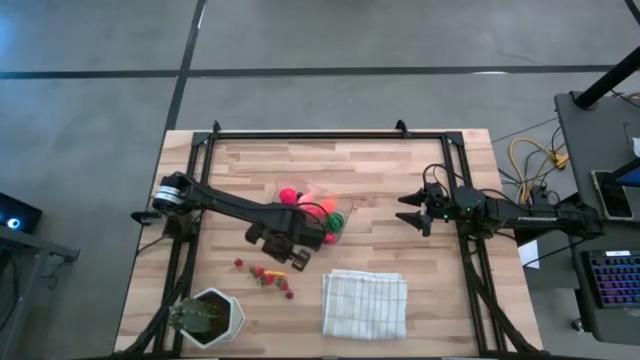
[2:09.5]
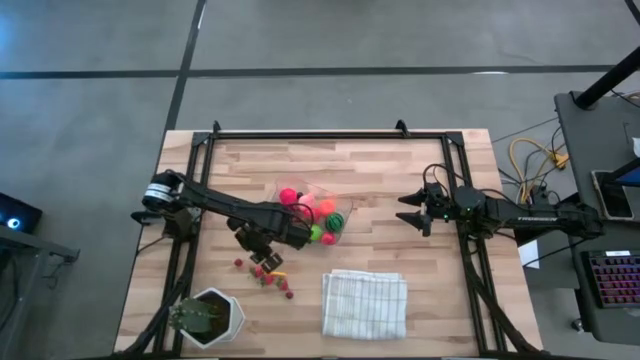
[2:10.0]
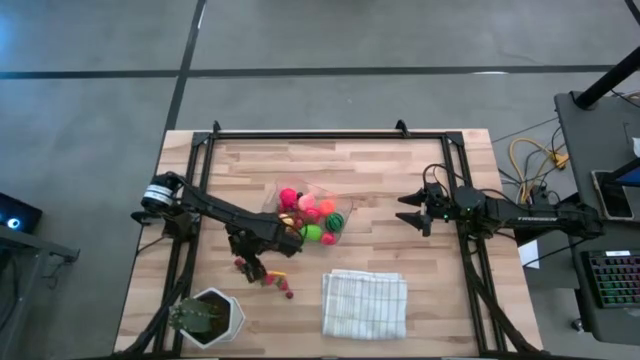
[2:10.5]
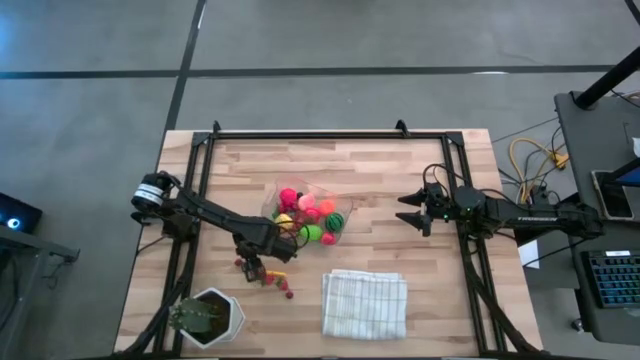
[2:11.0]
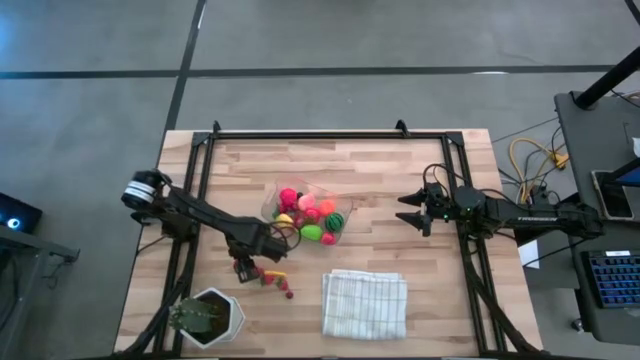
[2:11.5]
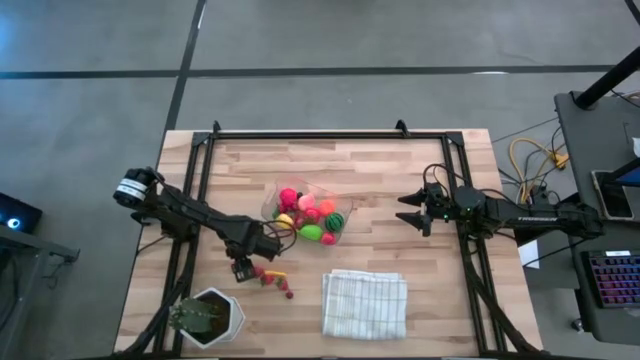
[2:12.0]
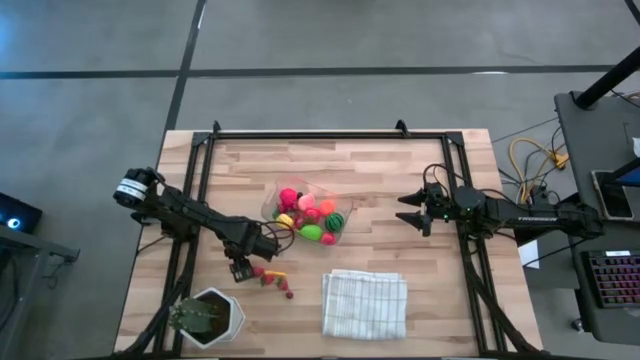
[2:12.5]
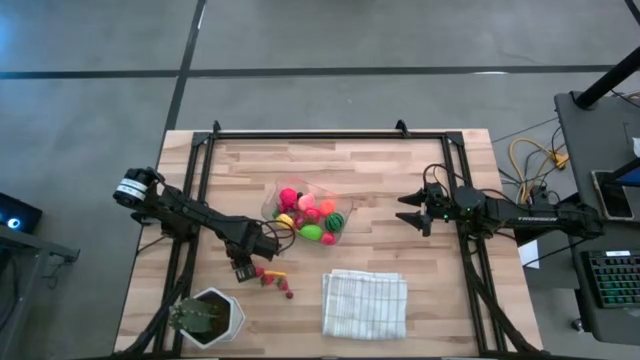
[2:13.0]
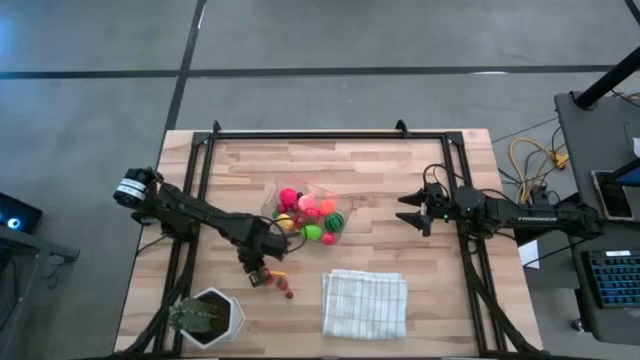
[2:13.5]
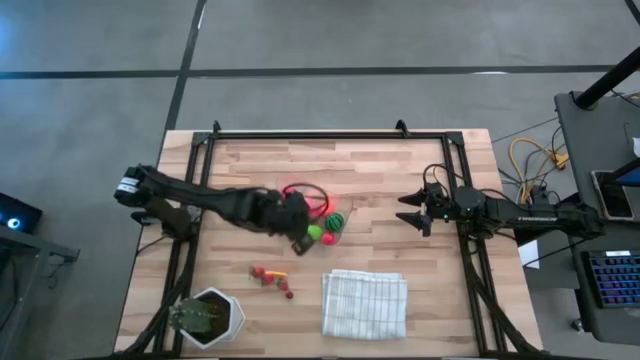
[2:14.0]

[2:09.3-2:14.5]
Task: Pick and placing Produce into tupperware
Put the red cherry into the transparent bin

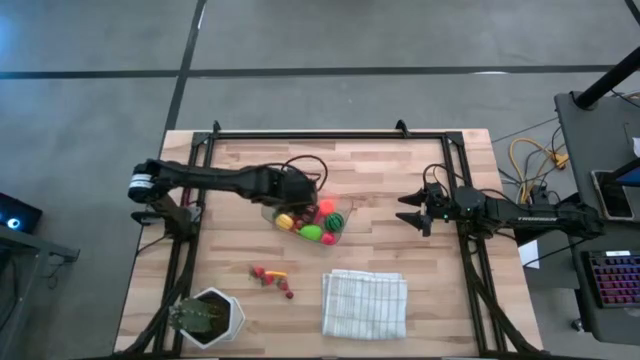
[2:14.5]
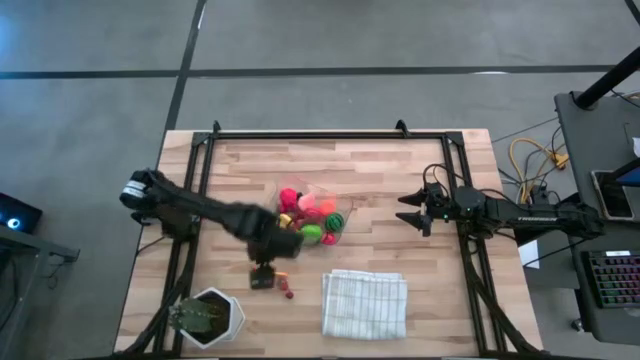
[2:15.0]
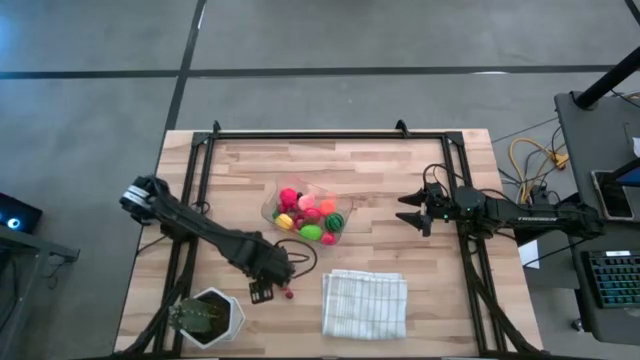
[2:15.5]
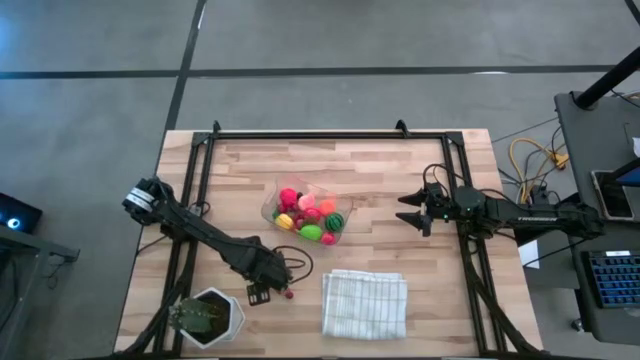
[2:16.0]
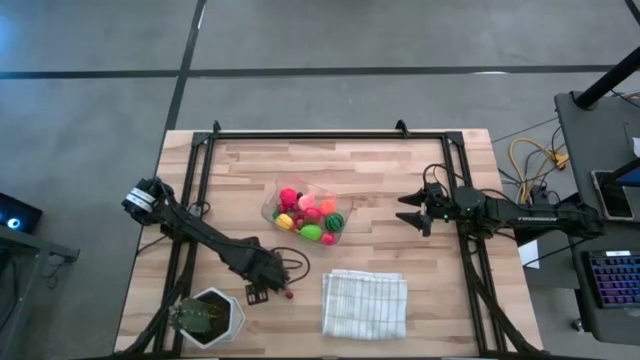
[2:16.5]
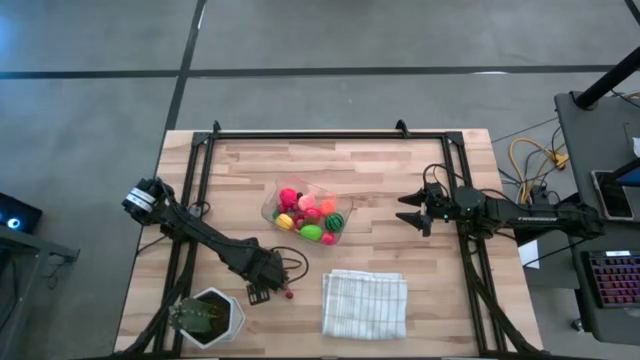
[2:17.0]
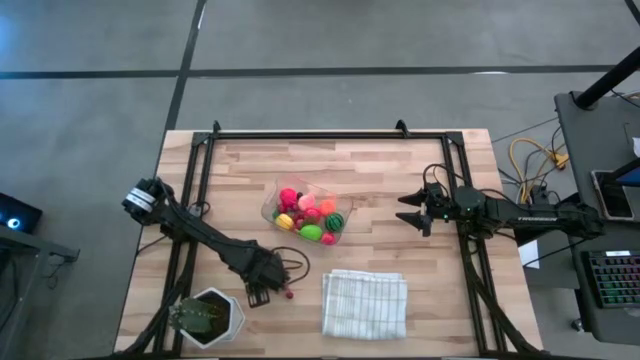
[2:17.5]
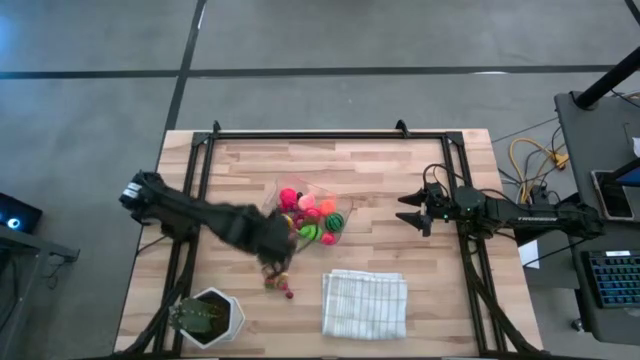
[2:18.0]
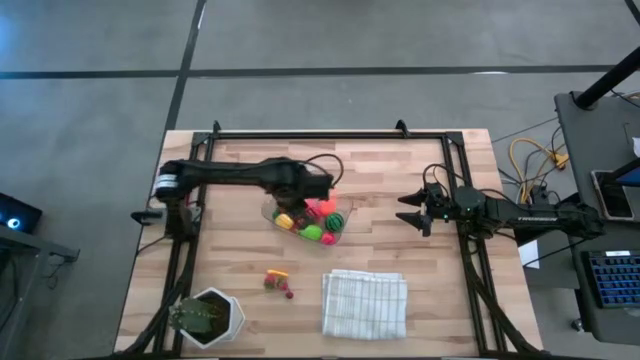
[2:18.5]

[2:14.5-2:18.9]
Put the red strawberry into the transparent bin

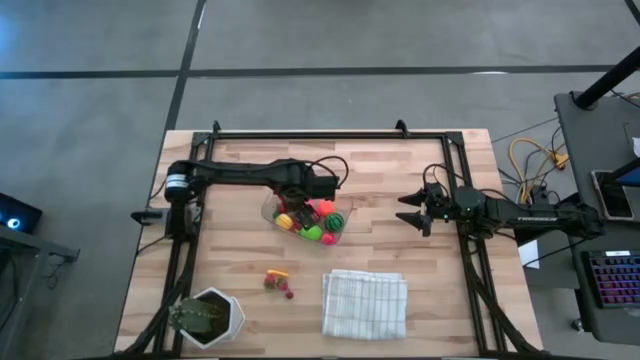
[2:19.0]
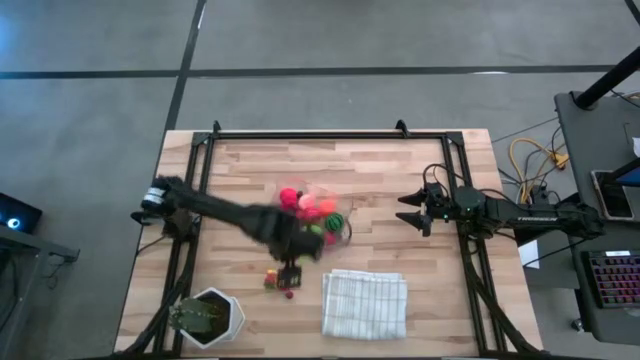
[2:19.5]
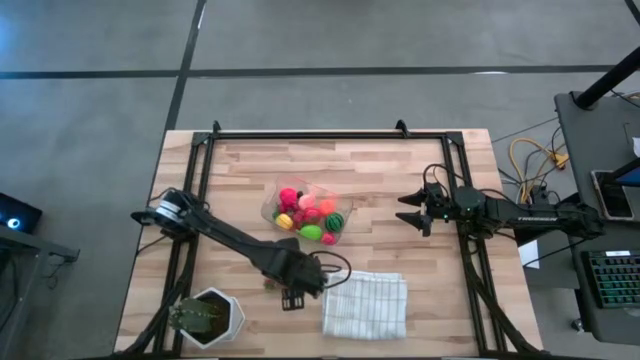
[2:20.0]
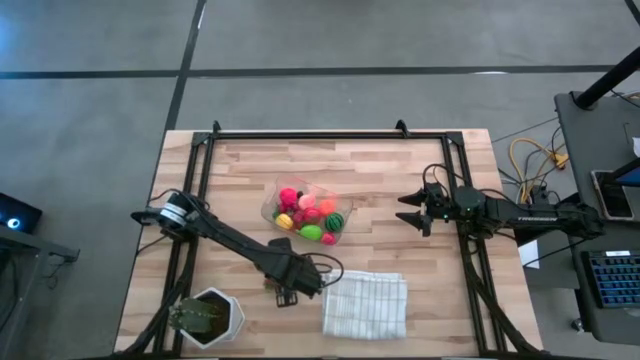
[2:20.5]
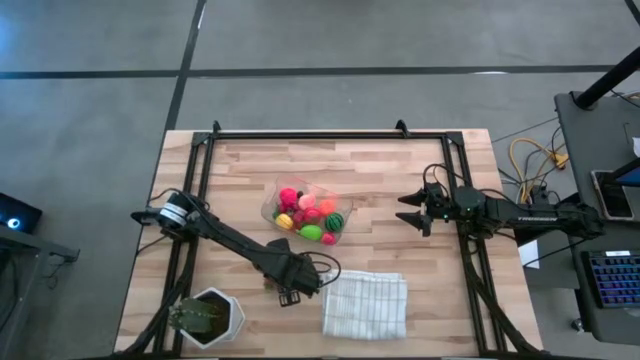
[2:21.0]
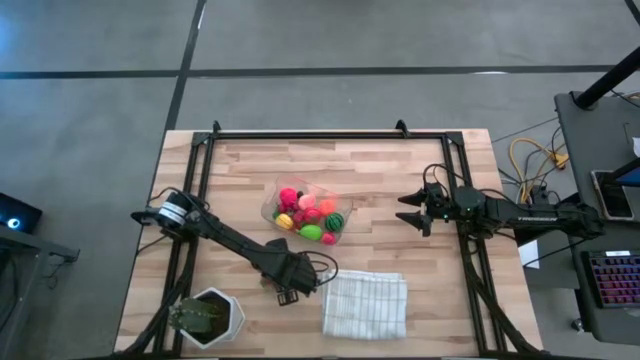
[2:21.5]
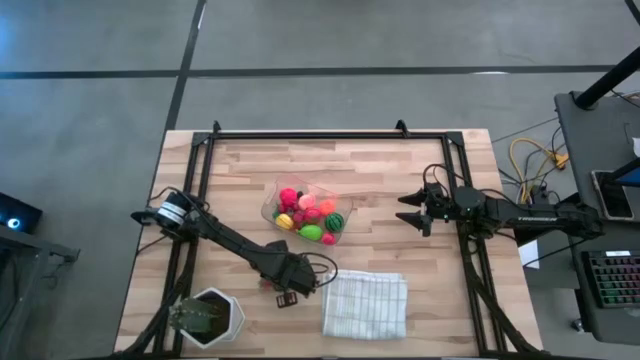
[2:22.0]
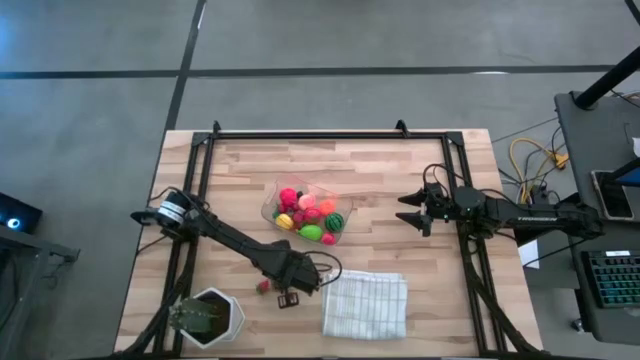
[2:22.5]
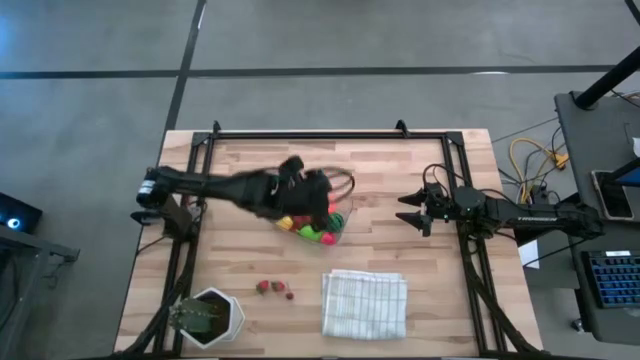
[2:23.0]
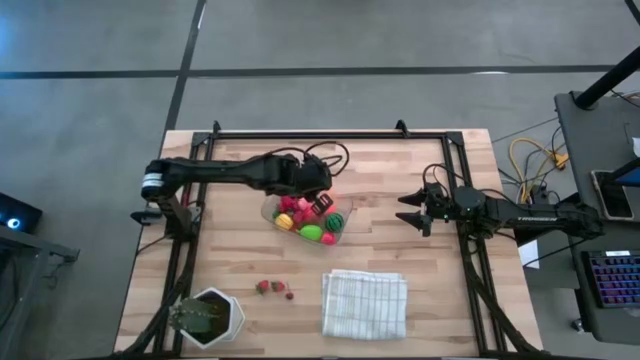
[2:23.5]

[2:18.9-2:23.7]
Put the yellow corn into the transparent bin

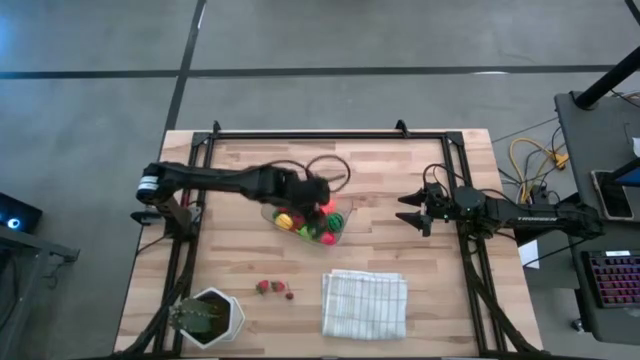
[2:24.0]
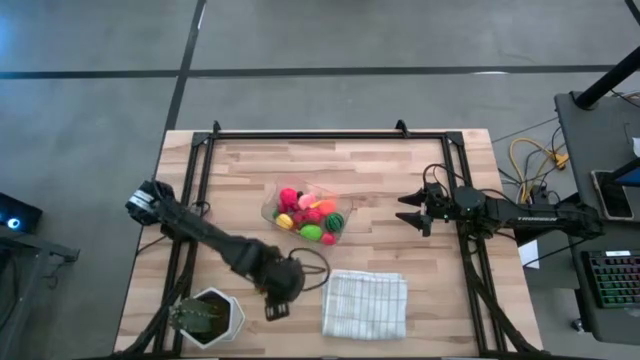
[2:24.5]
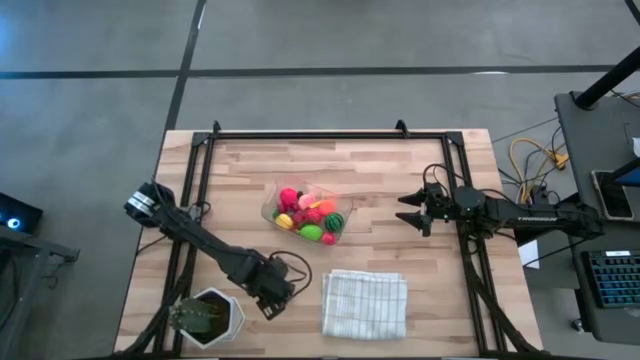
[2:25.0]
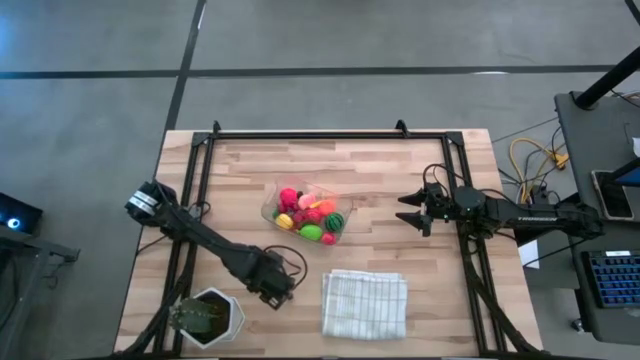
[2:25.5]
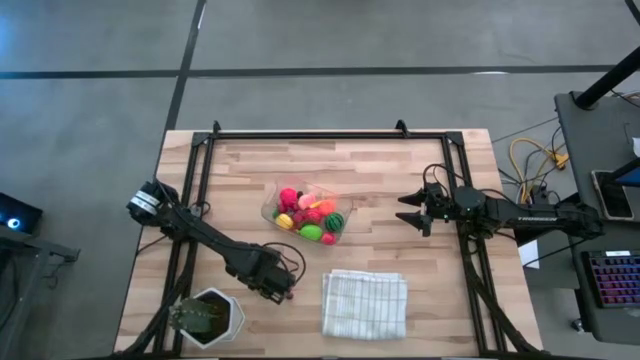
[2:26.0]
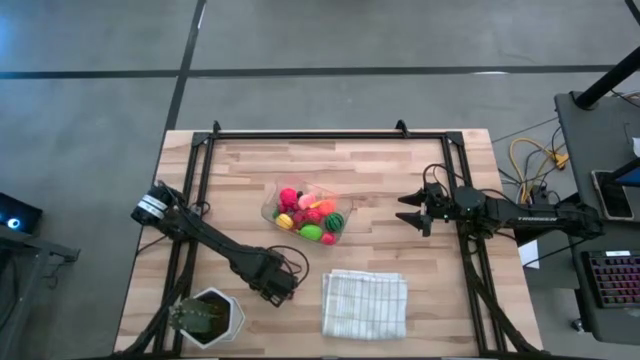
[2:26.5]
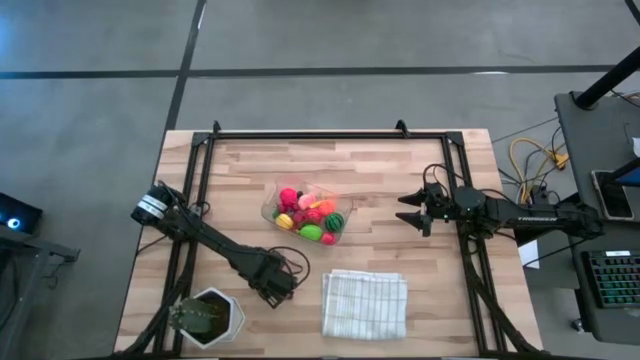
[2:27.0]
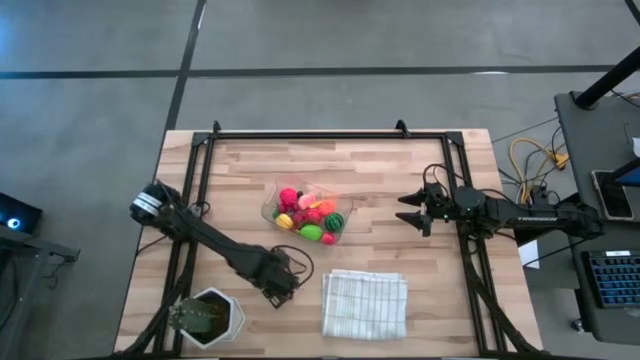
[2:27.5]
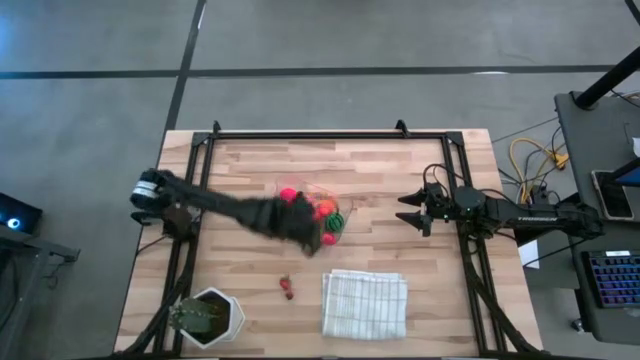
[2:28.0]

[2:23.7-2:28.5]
Put the red strawberry into the transparent bin

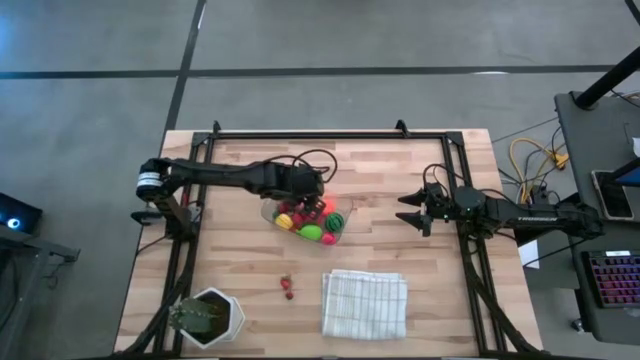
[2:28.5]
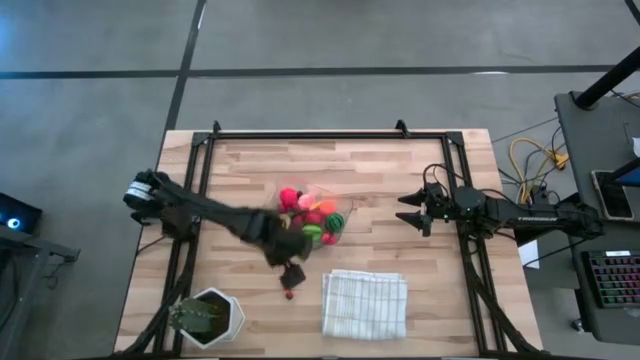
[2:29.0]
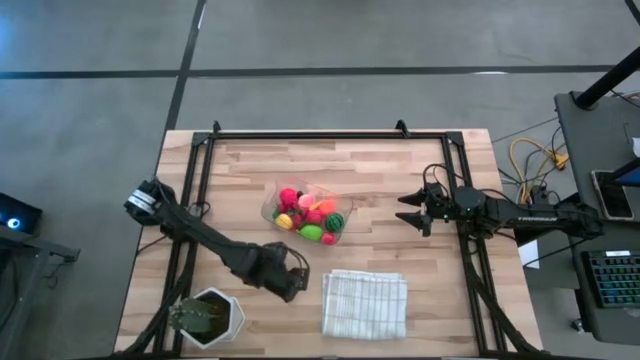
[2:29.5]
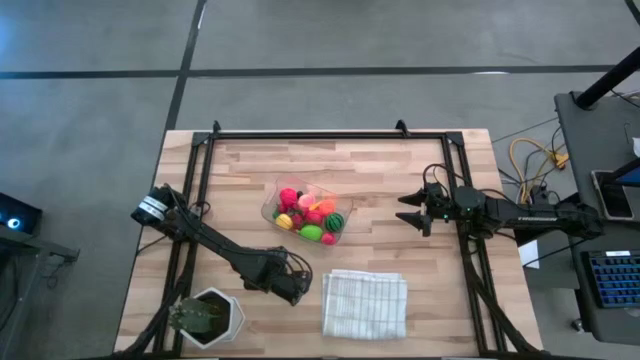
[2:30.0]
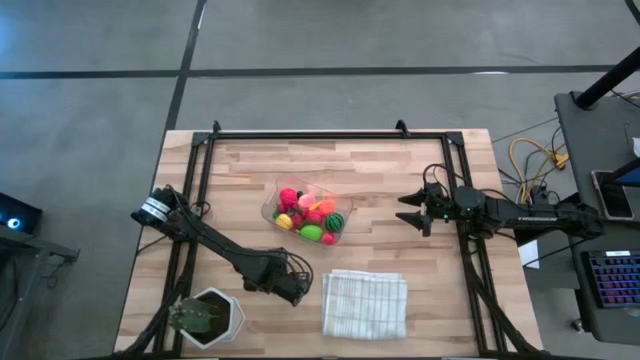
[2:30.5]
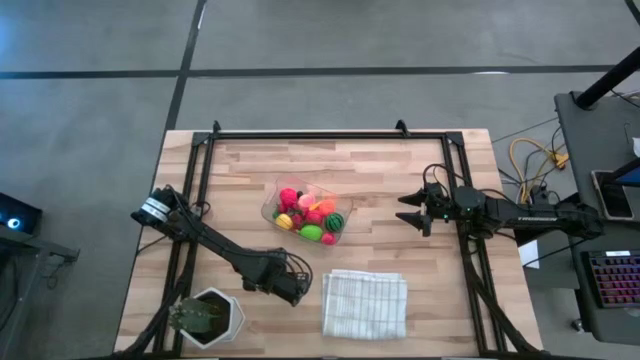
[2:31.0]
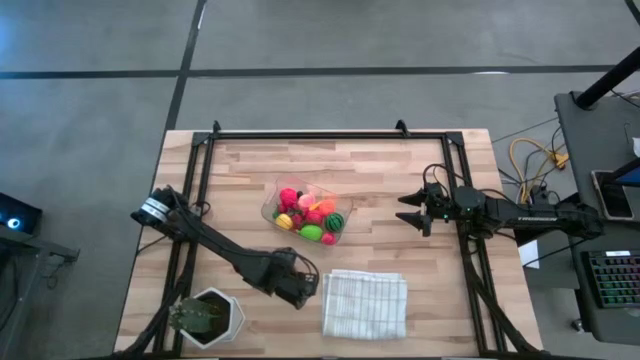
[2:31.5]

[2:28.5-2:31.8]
Put the red strawberry into the transparent bin
